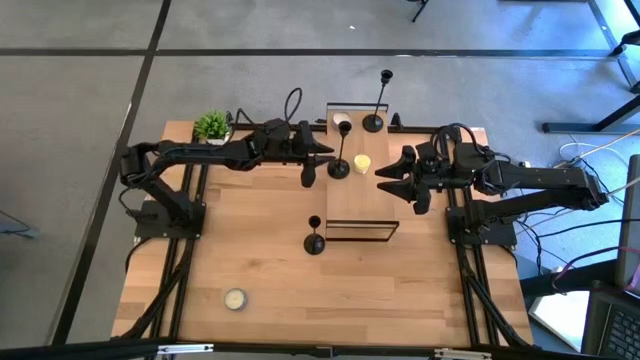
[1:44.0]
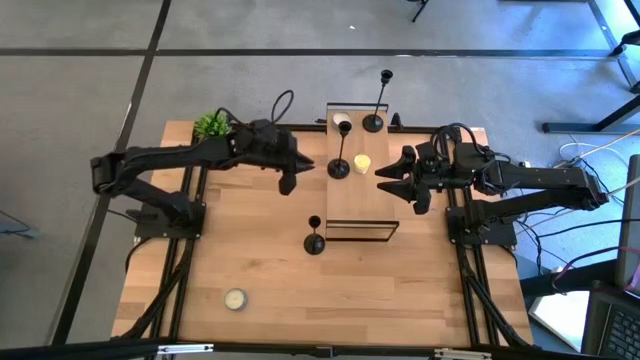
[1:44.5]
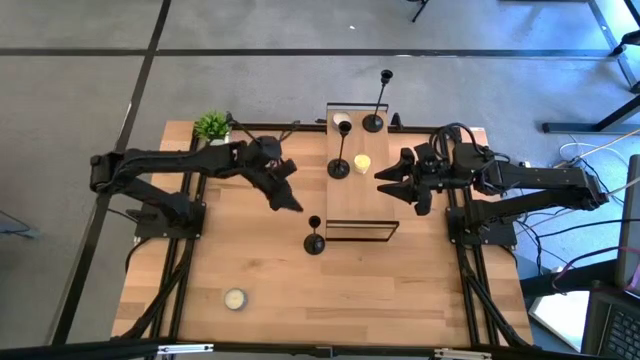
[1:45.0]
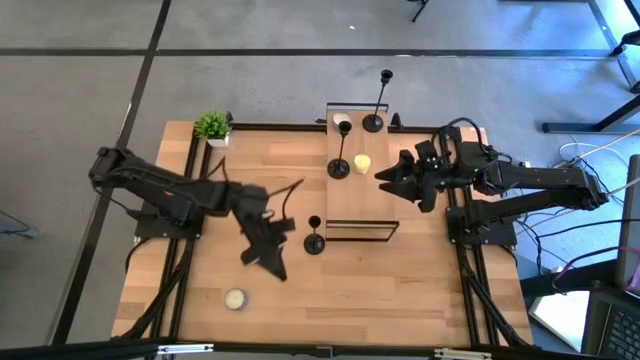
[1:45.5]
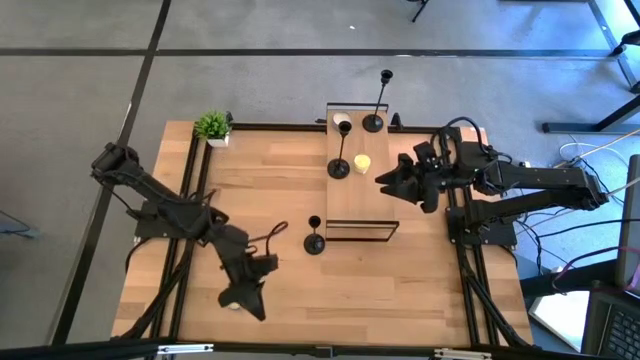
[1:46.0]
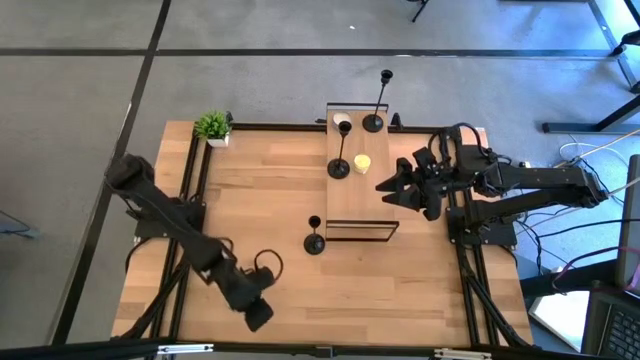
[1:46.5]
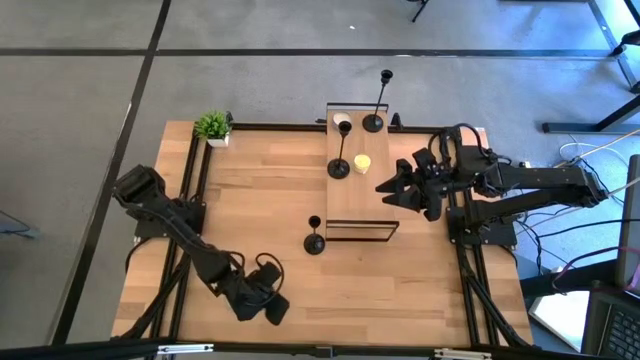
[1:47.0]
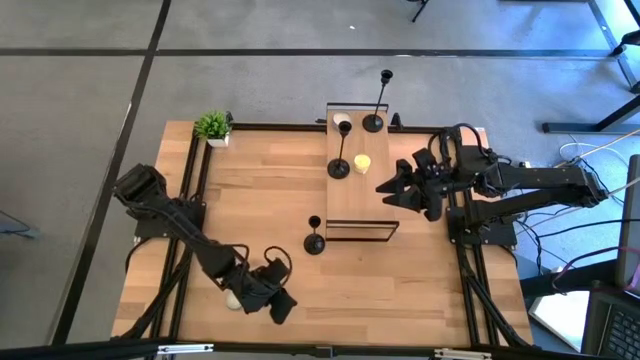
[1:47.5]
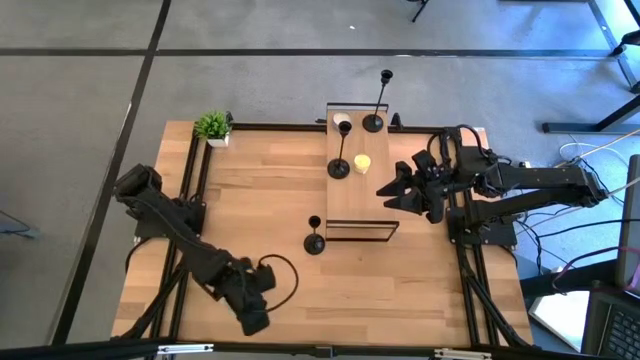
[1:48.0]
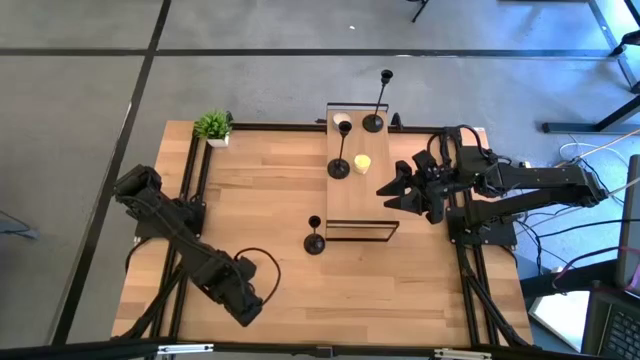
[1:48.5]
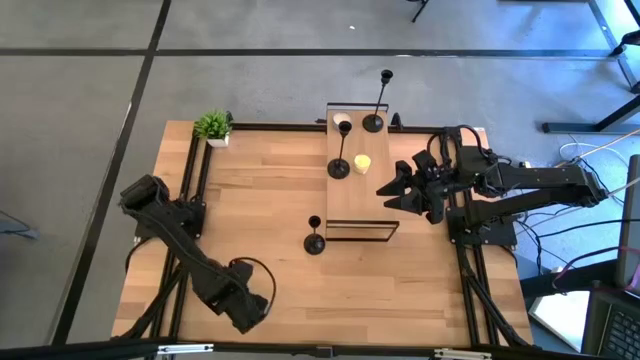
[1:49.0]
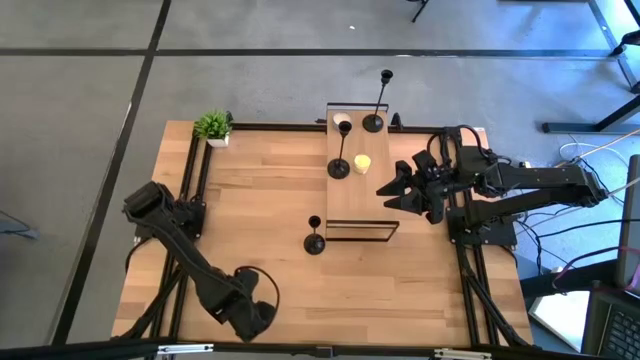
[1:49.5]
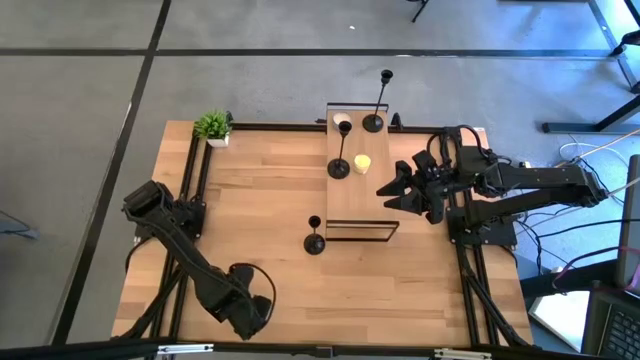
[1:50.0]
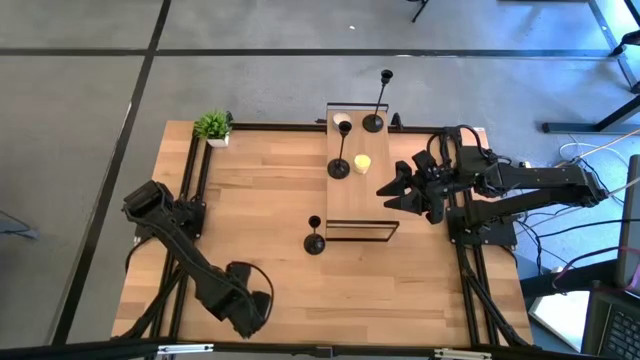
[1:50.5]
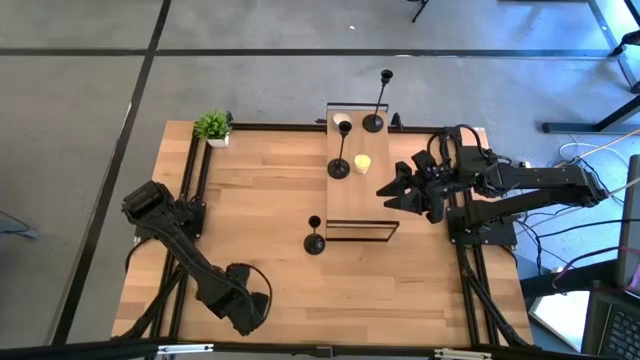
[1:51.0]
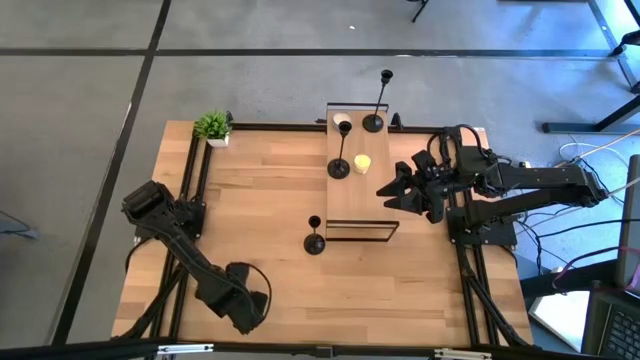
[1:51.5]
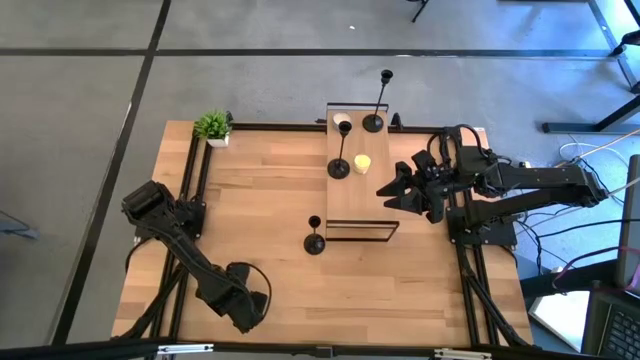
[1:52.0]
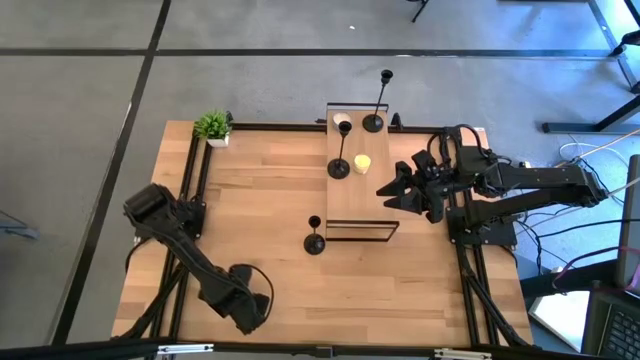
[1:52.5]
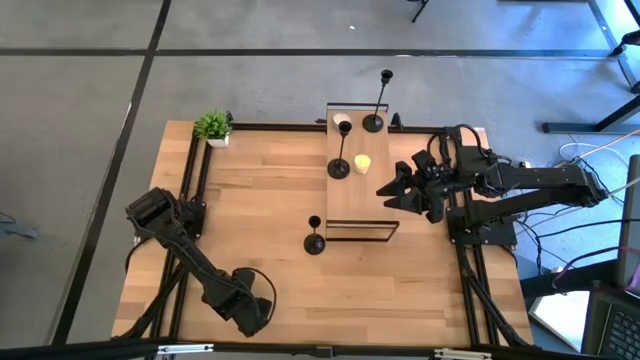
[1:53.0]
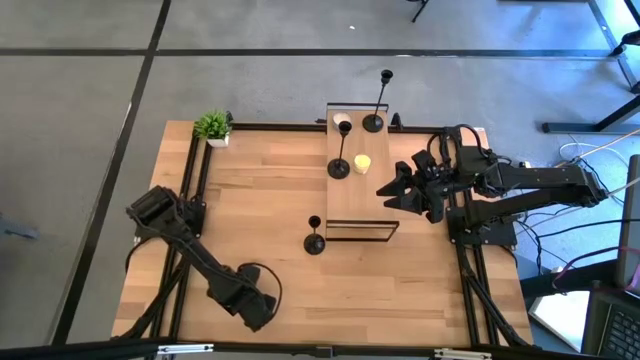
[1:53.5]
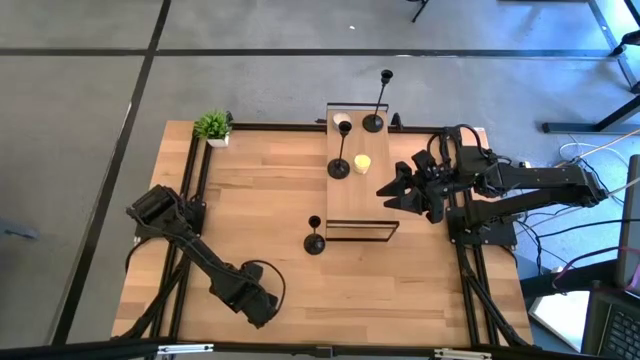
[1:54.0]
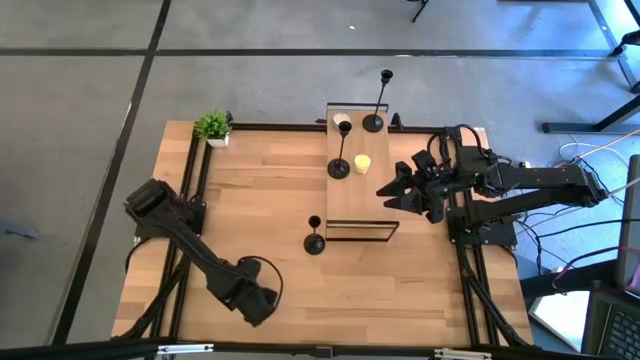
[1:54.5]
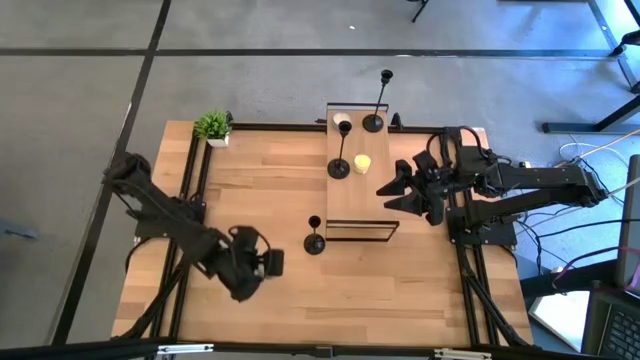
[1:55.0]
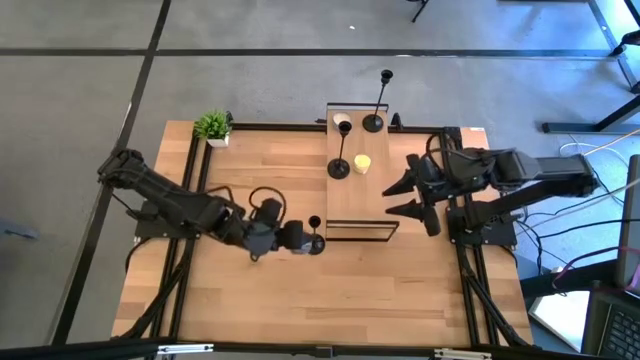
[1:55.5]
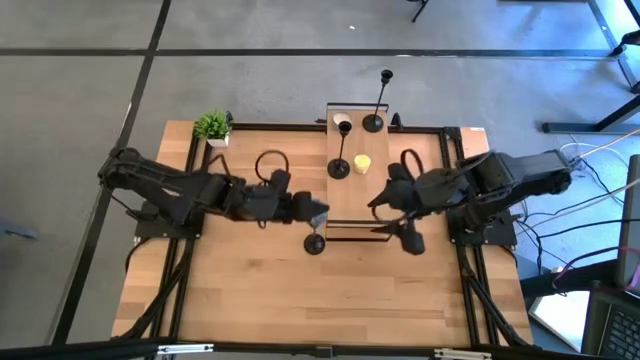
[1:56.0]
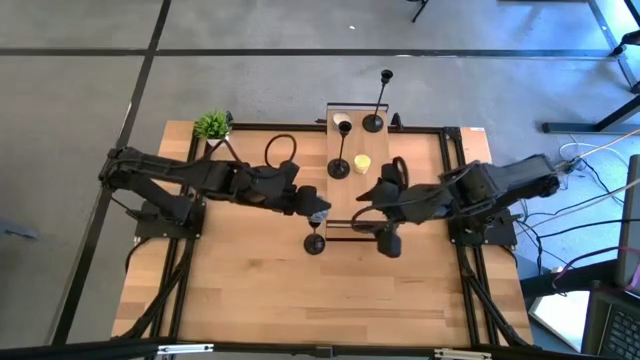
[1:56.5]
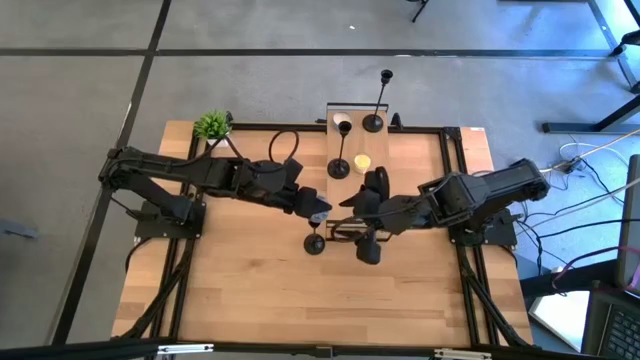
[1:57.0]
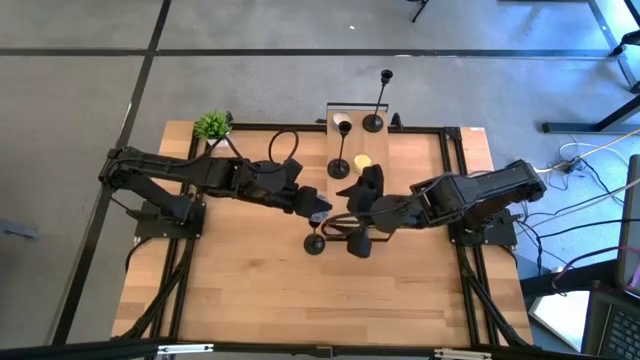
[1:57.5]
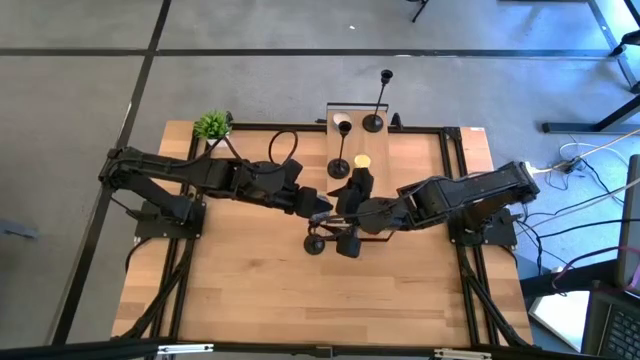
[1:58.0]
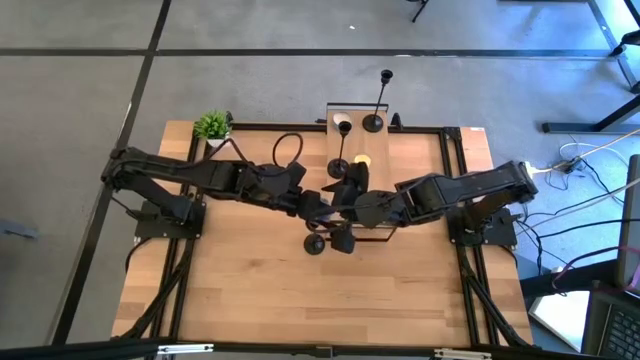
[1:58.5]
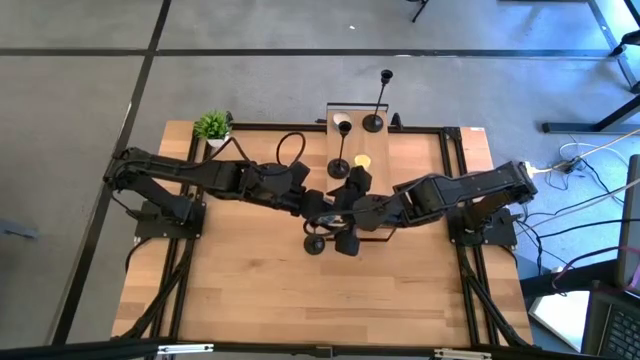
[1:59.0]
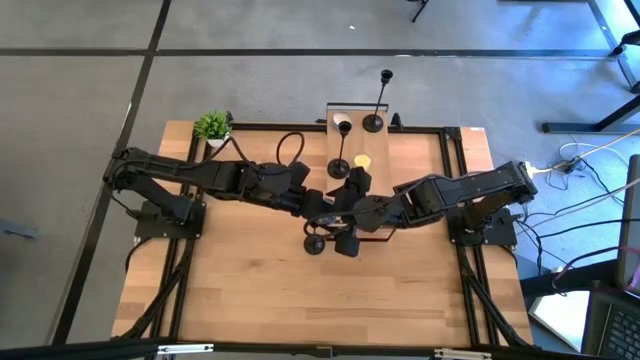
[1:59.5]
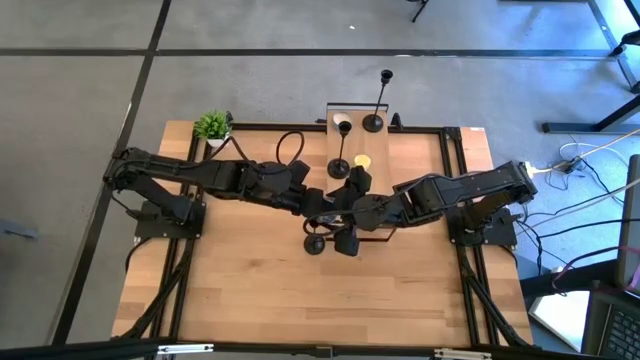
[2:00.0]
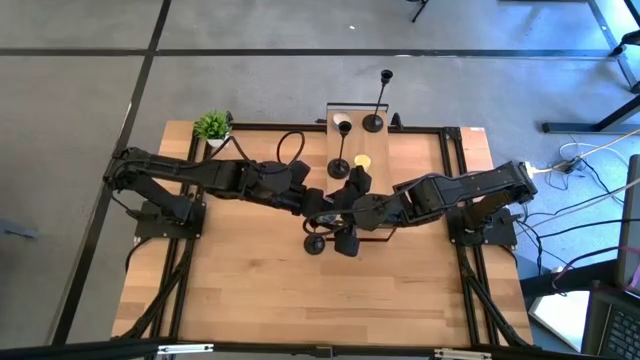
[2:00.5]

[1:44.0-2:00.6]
Task: Pick & Place candle stick holders
Put the blue candle jar in the bottom left corner of the shelf

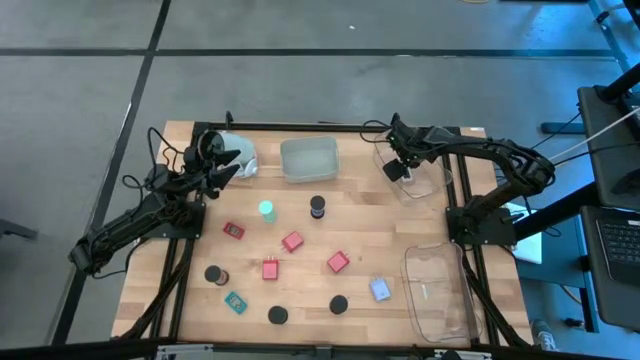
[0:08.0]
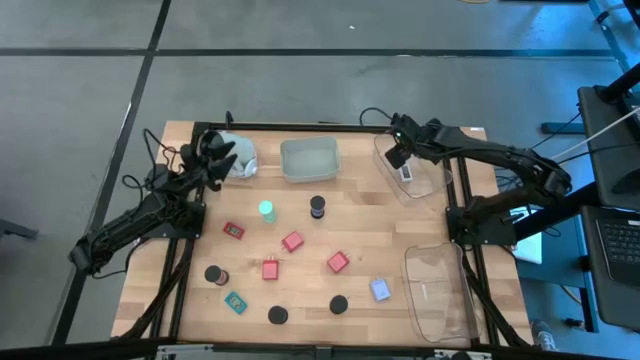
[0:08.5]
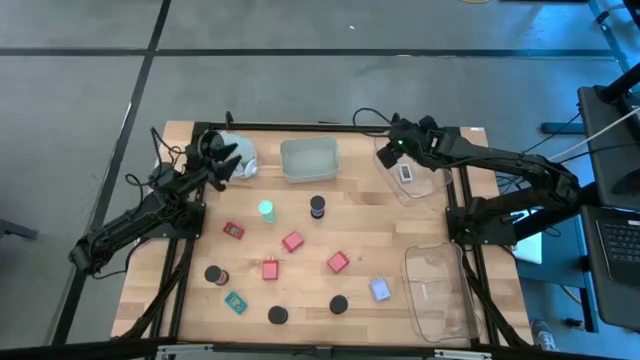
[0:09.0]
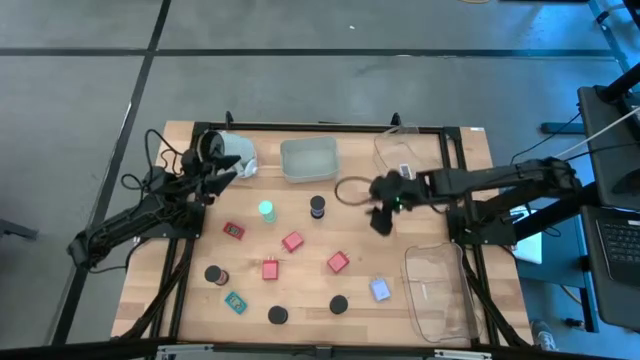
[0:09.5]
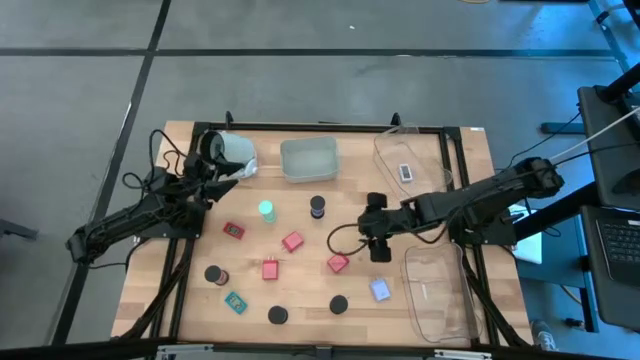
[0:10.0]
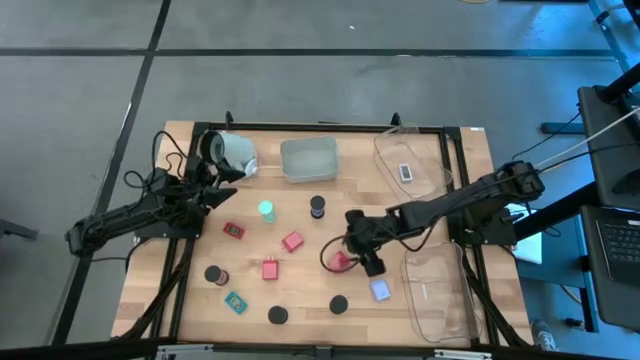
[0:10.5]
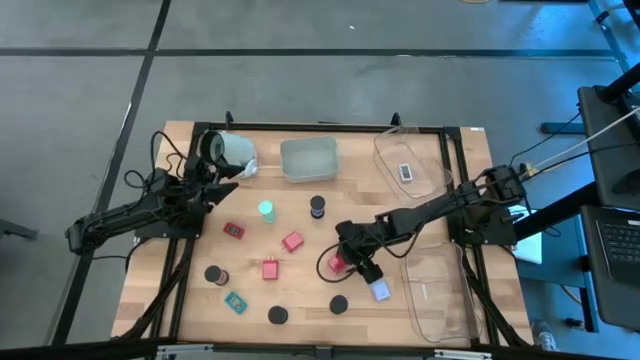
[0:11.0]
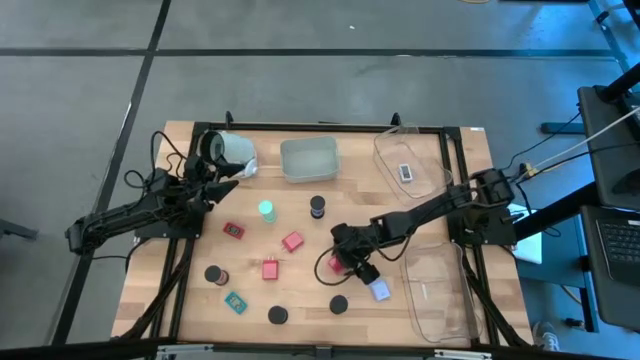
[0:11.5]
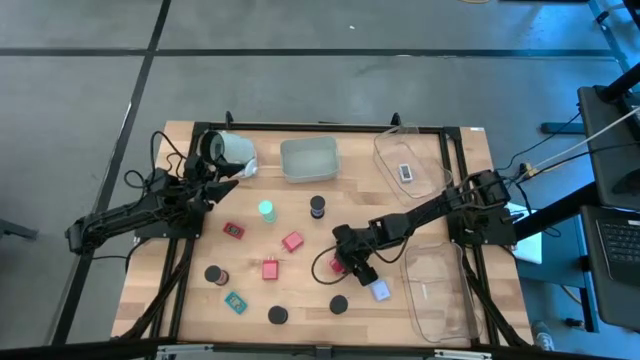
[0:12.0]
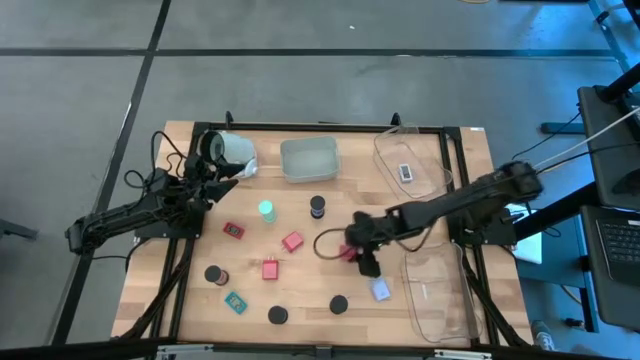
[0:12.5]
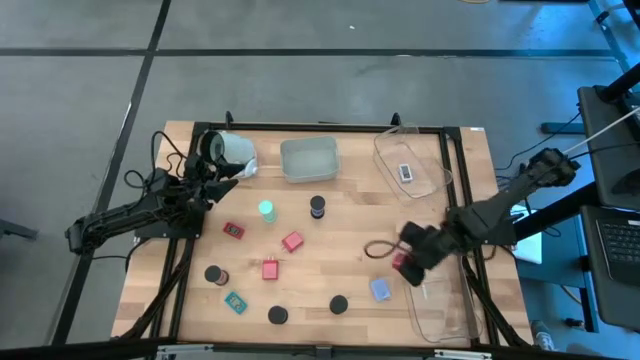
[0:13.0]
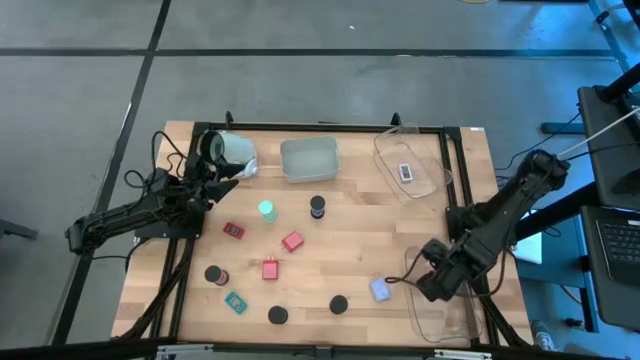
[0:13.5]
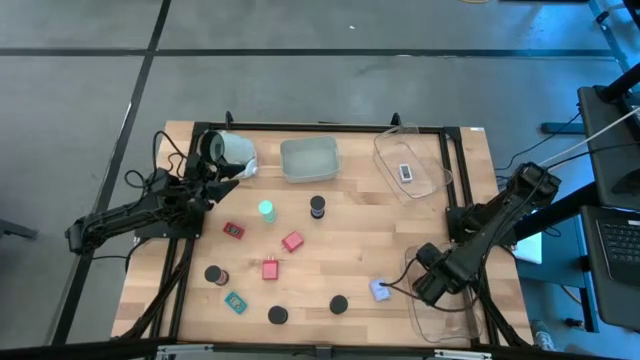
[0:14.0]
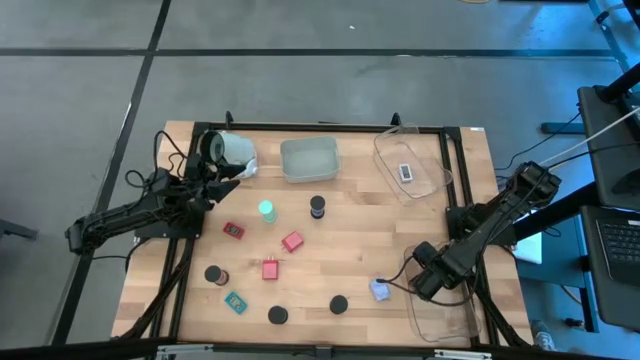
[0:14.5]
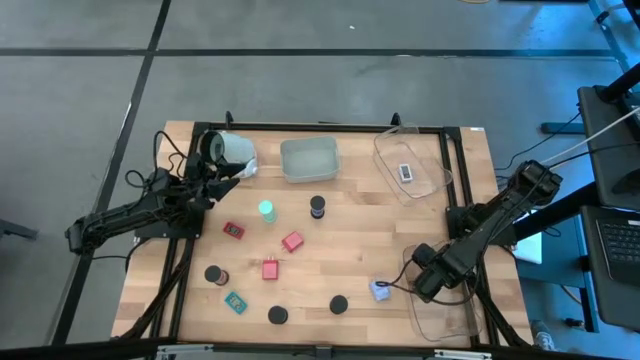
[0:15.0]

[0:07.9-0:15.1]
Task: Pick & Place Office items
Put the bottom right red charger adapter into the bottom transparent bin
